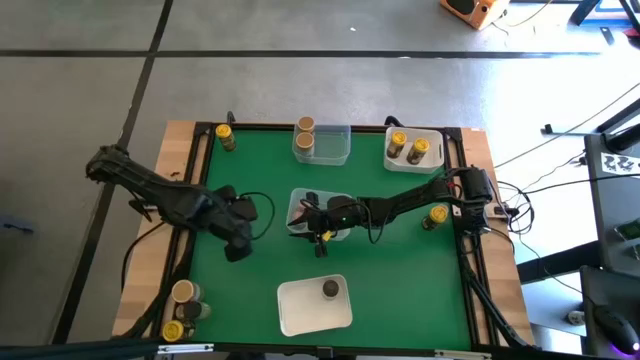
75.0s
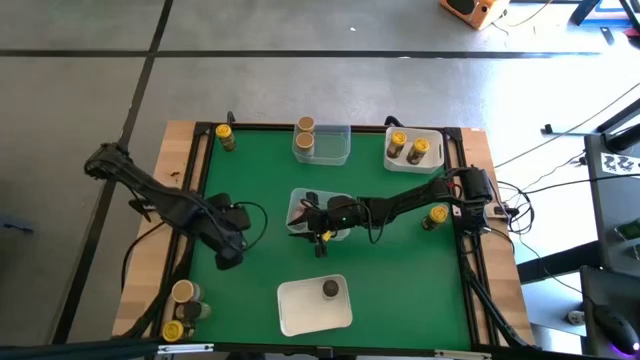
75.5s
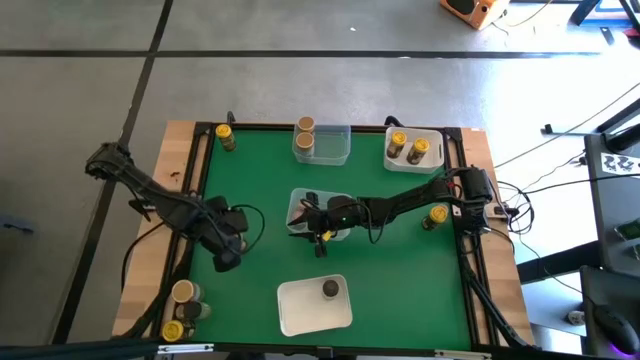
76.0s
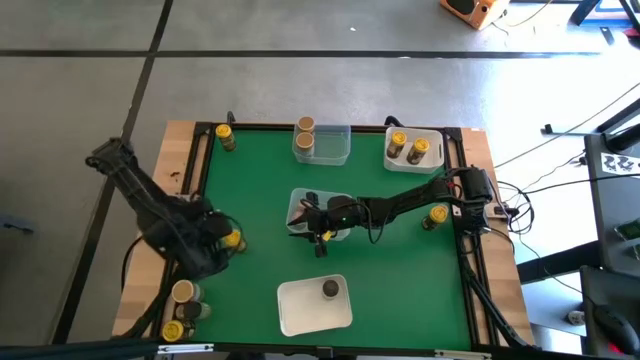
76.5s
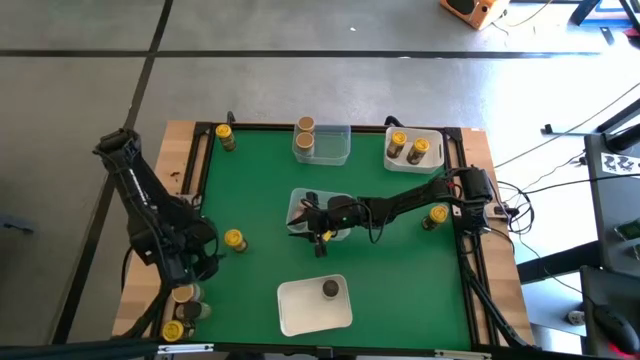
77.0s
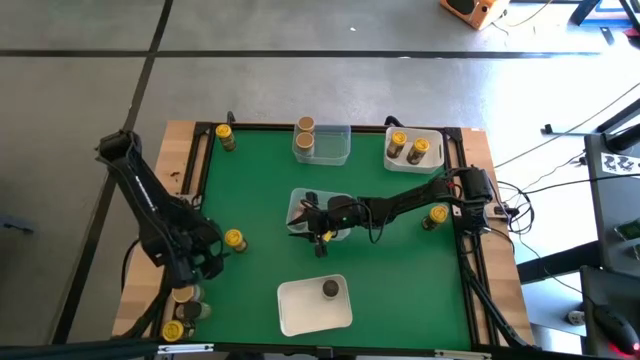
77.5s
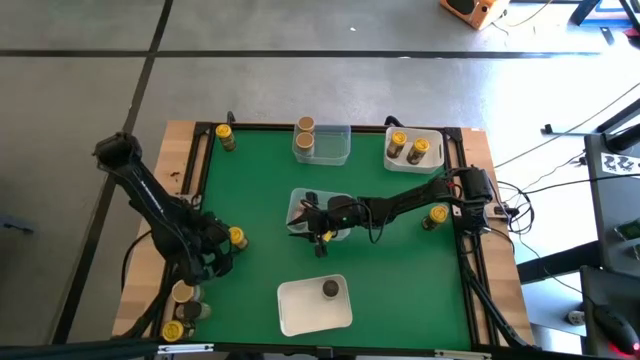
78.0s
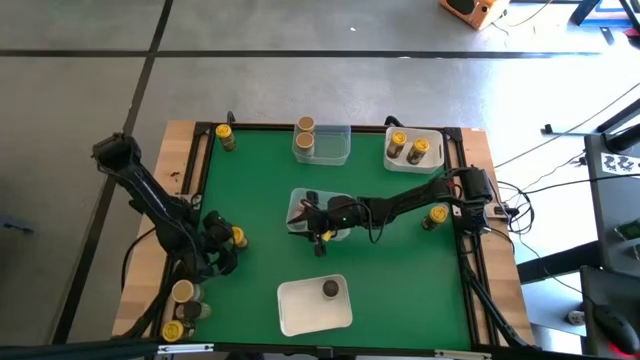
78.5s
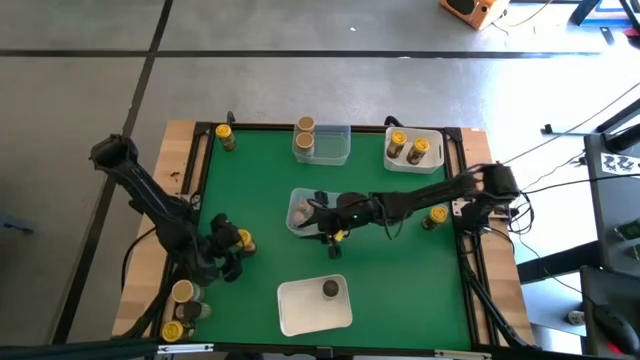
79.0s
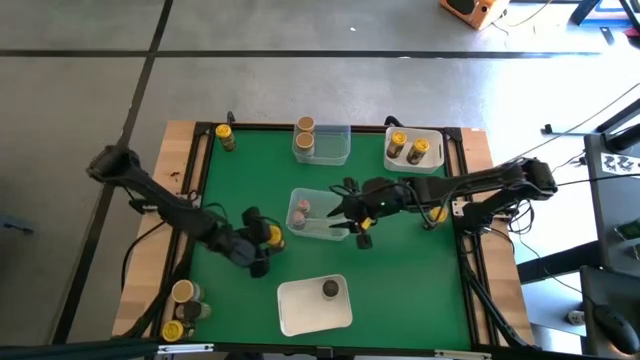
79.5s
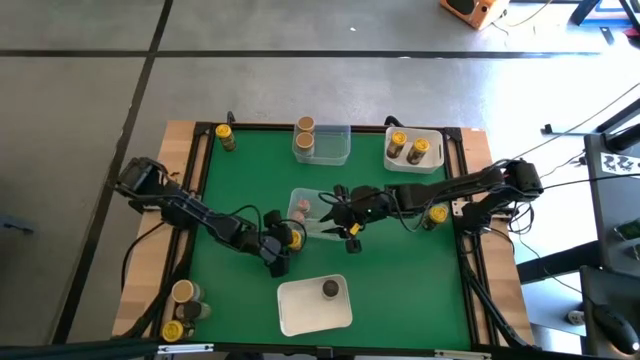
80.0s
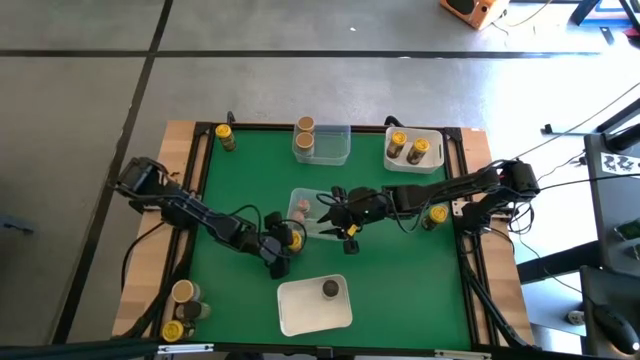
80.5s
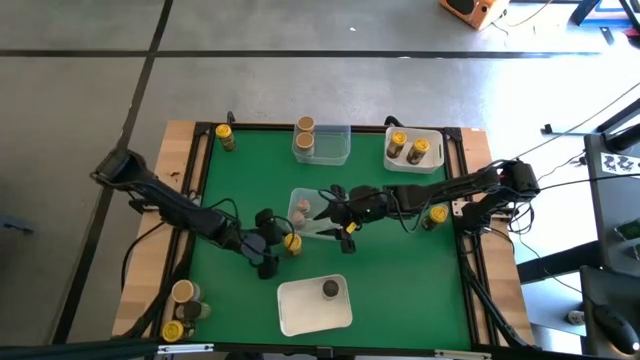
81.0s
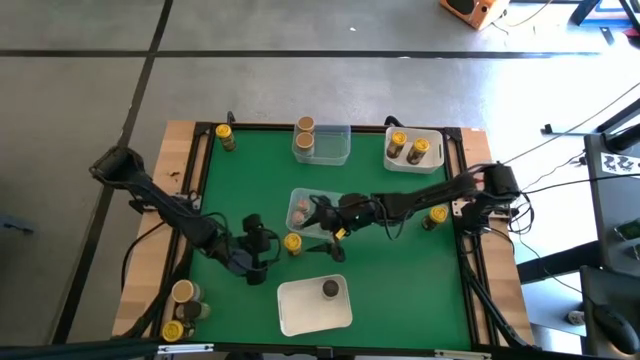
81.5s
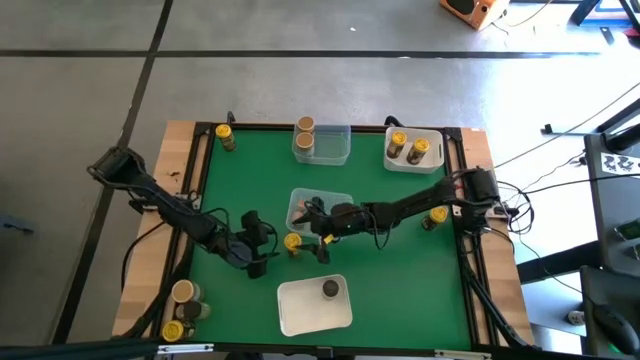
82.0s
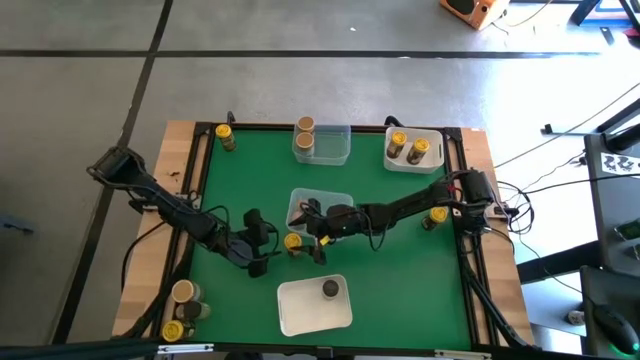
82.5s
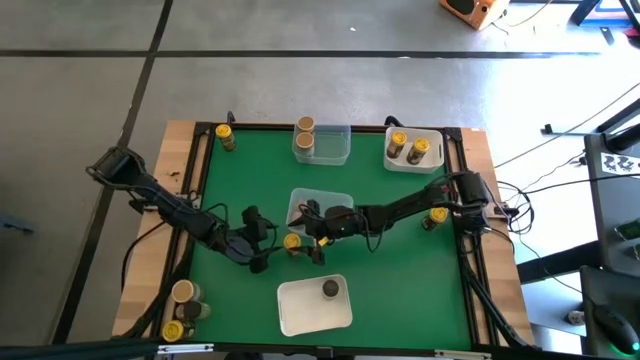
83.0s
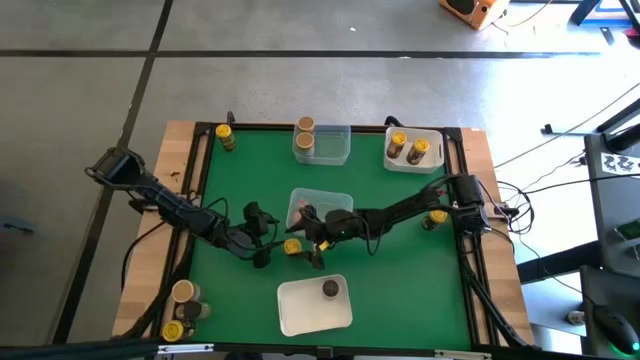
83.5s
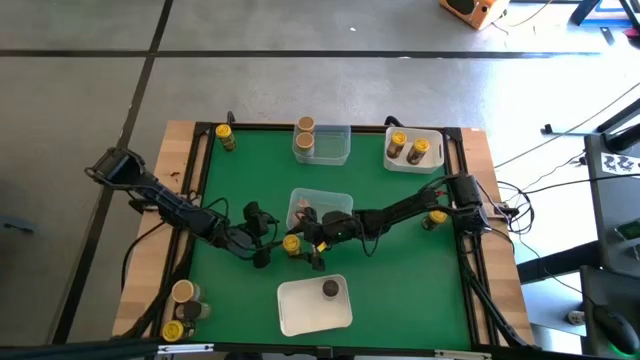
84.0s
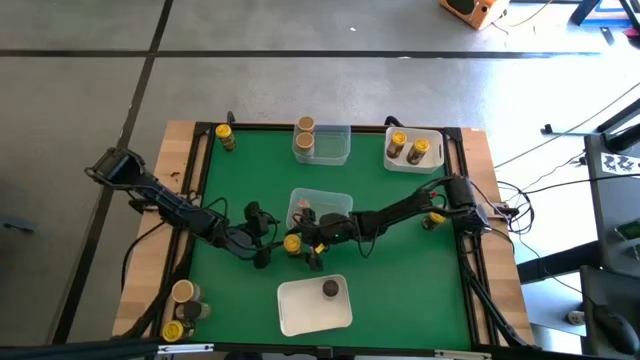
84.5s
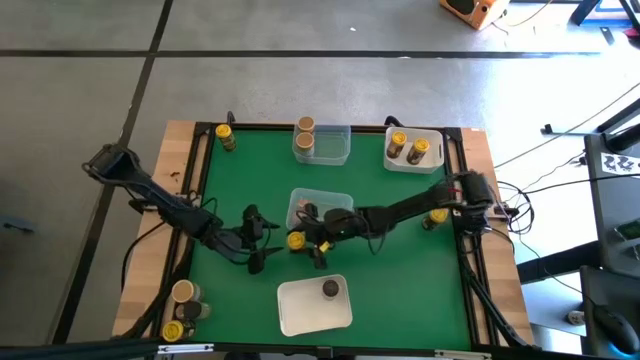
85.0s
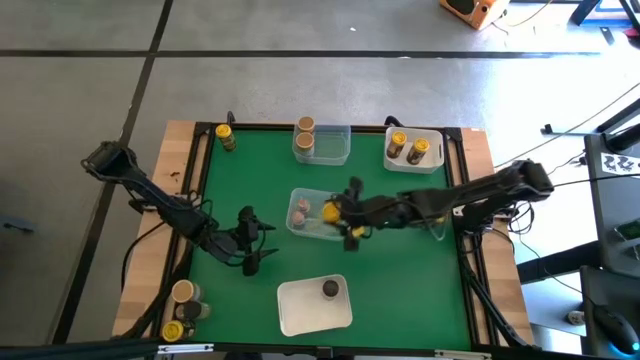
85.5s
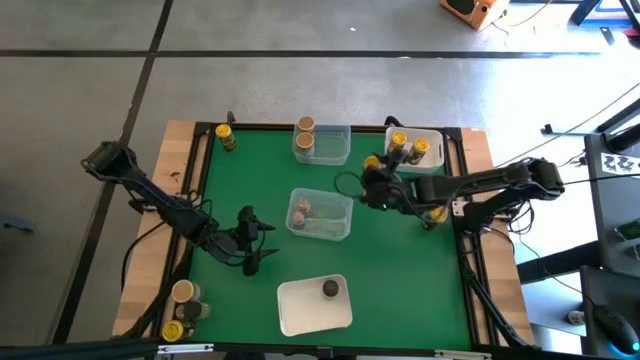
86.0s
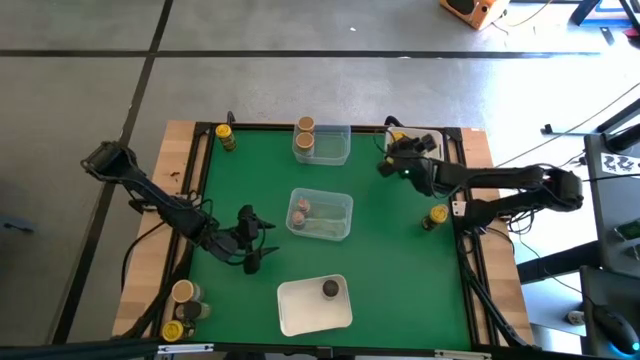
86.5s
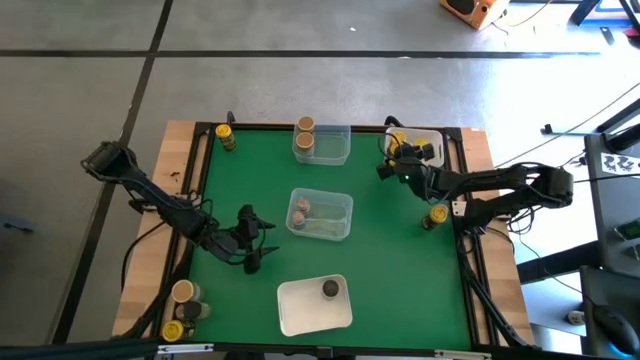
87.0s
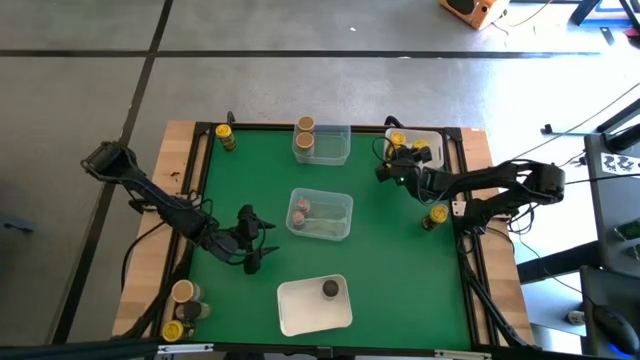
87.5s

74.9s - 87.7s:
Task: Sort spices by type
Put the yellow seasoning bottle into the top white bin

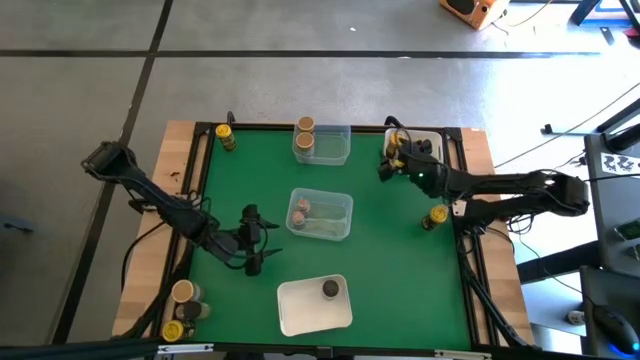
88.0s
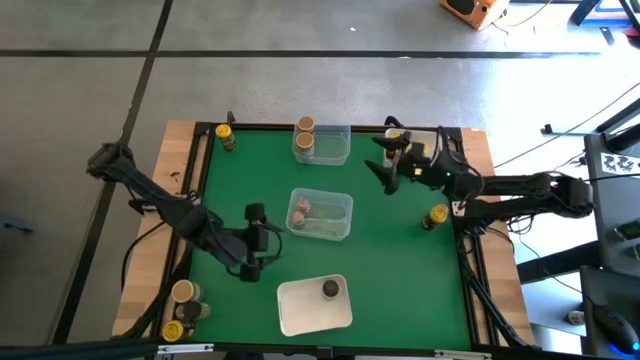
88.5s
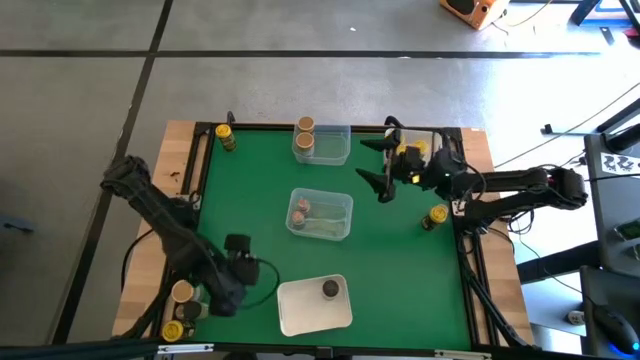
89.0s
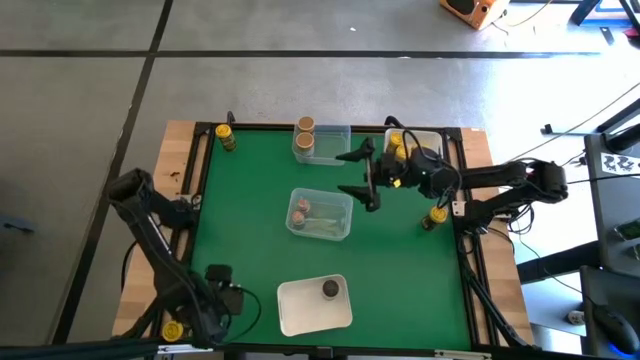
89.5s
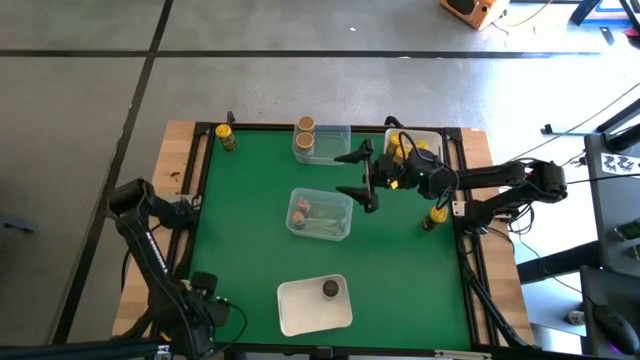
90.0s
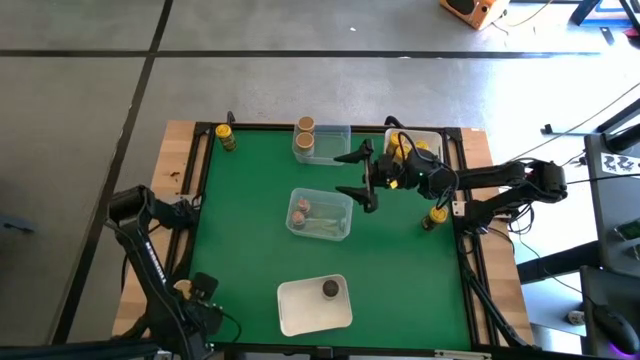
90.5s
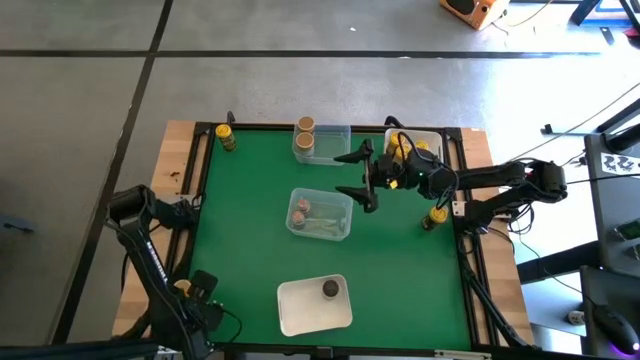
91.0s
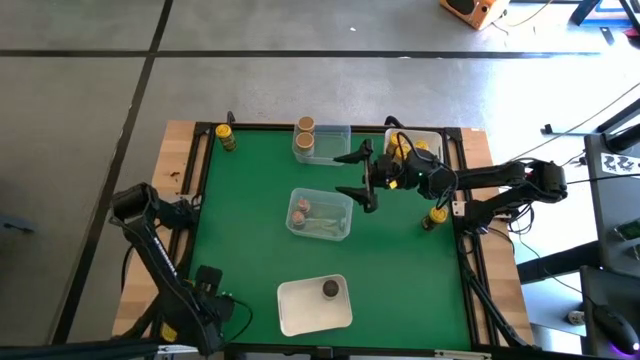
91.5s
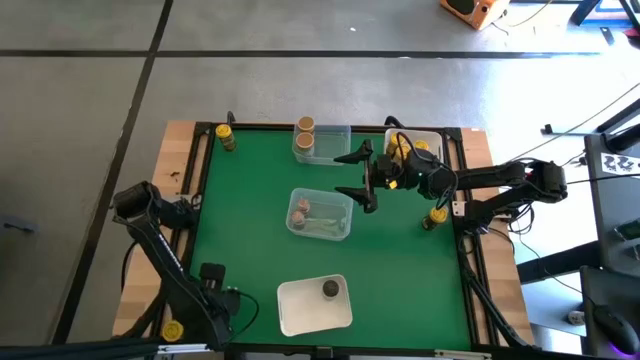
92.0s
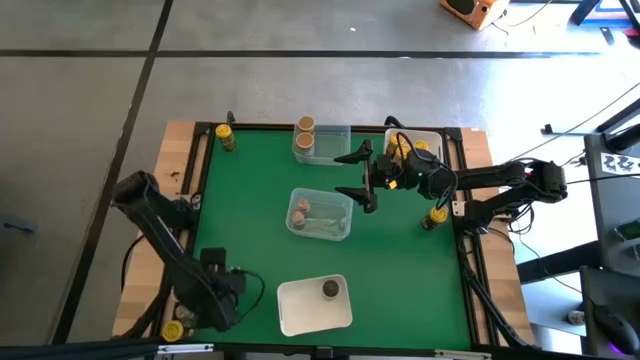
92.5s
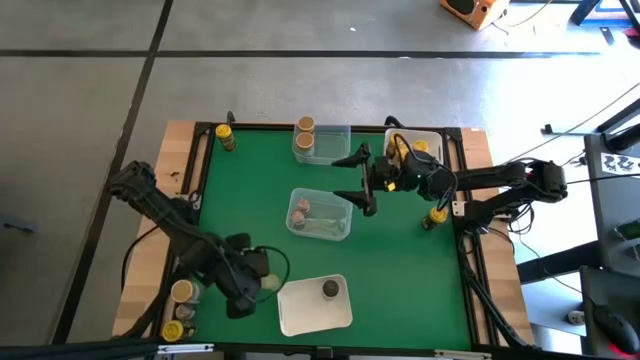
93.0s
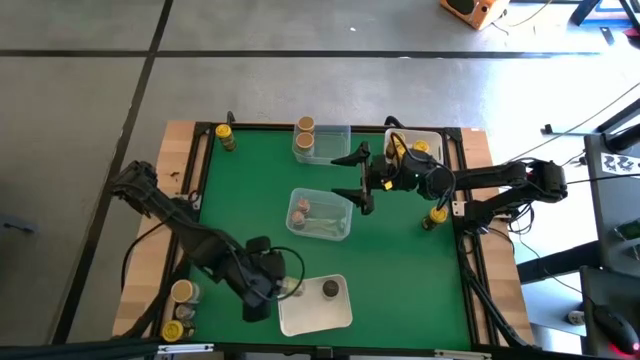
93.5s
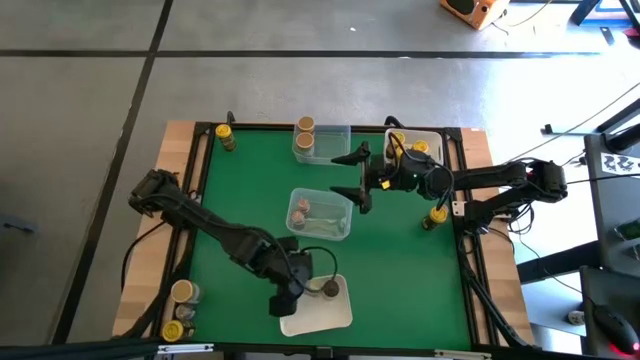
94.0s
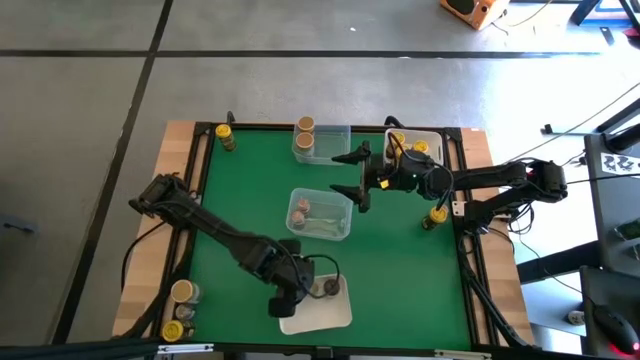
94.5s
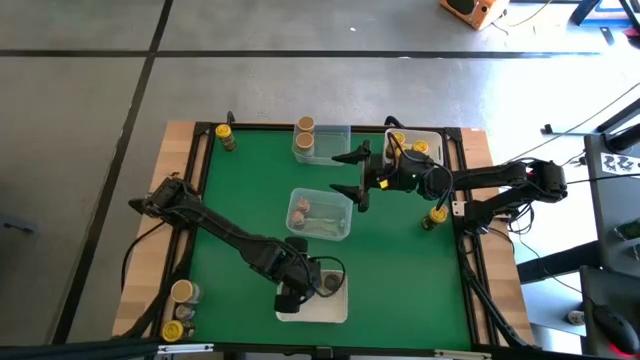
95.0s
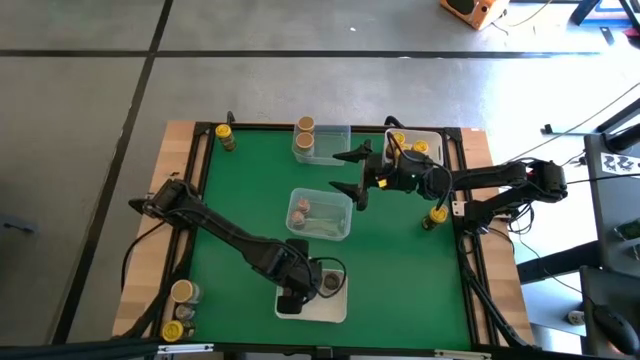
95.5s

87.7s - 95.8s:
Put the black seasoning bottle into the bottom white bin

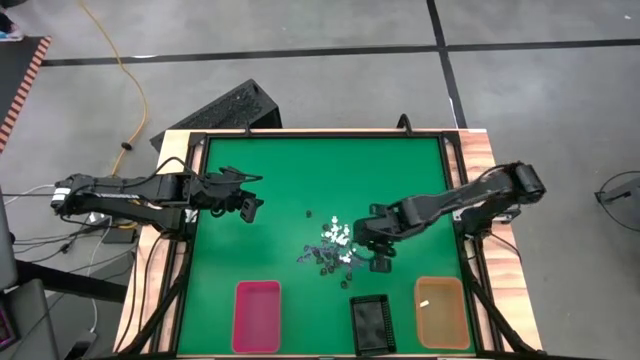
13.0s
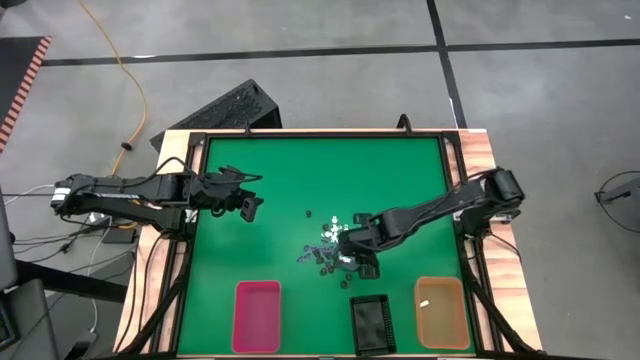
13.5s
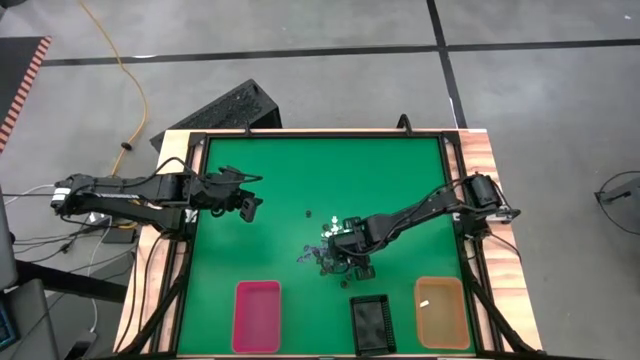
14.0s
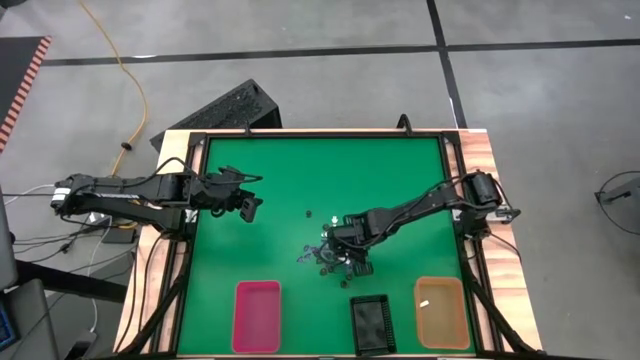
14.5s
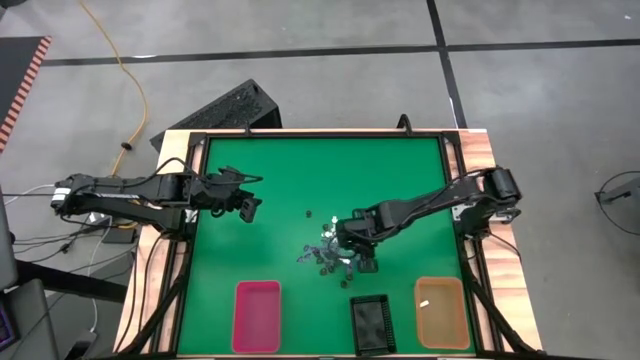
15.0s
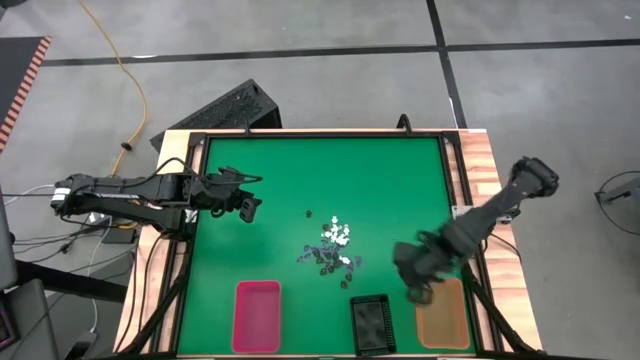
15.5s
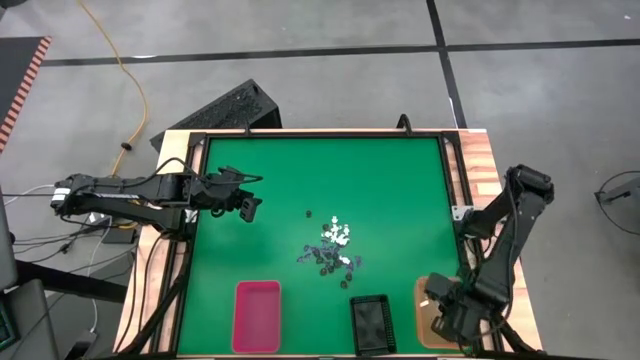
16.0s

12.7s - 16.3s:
Task: Sort Halloween decoration
Put the white skeleton toy into the right orange organizing bin
